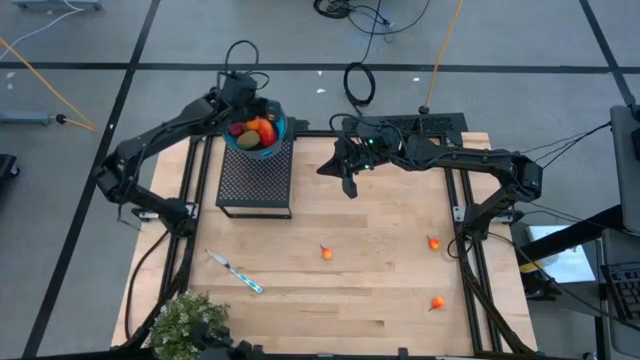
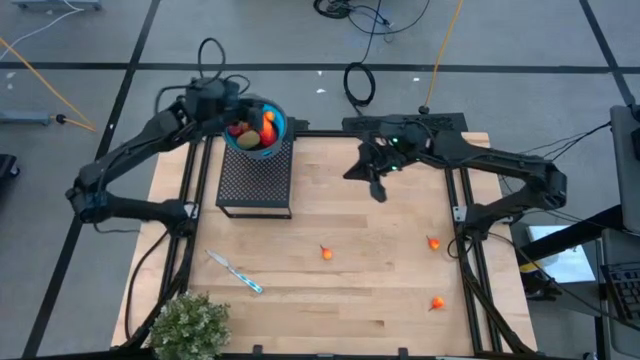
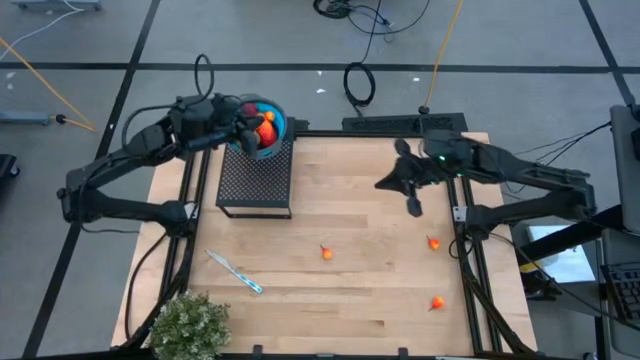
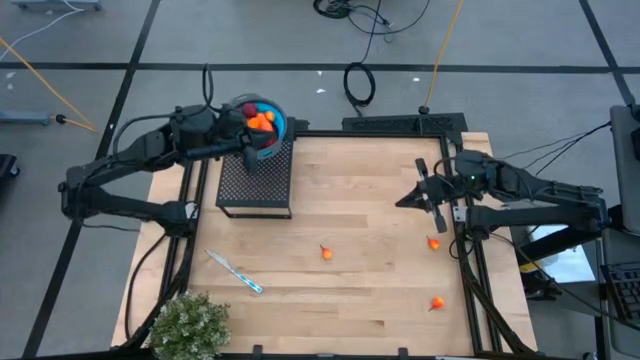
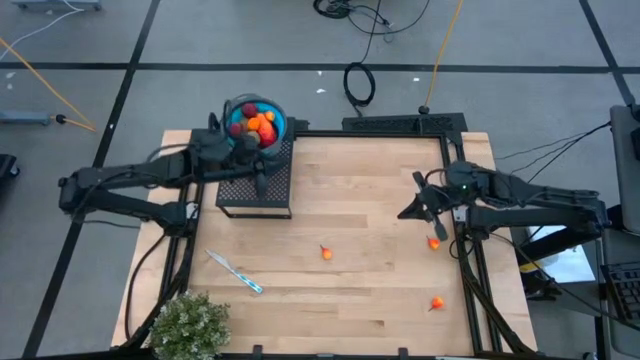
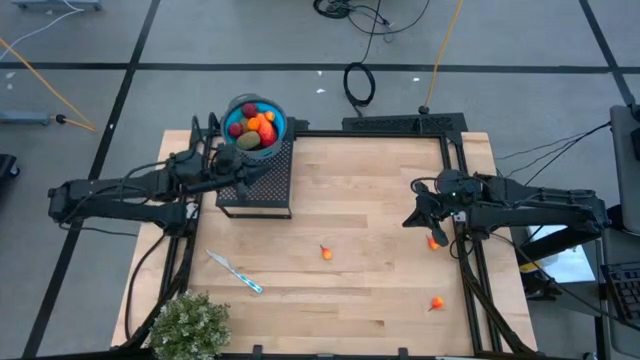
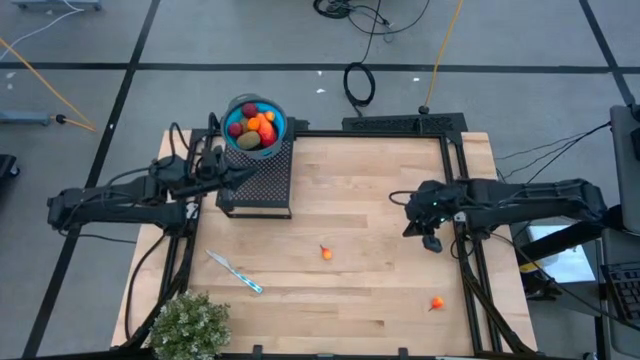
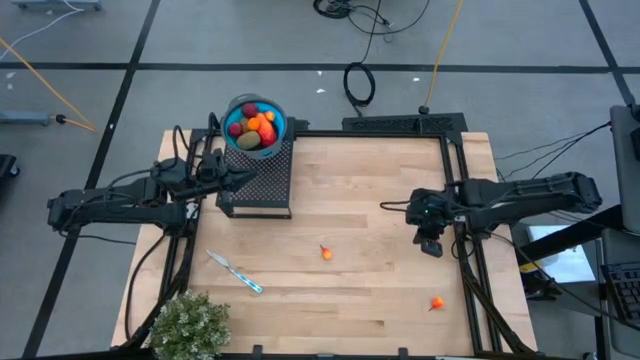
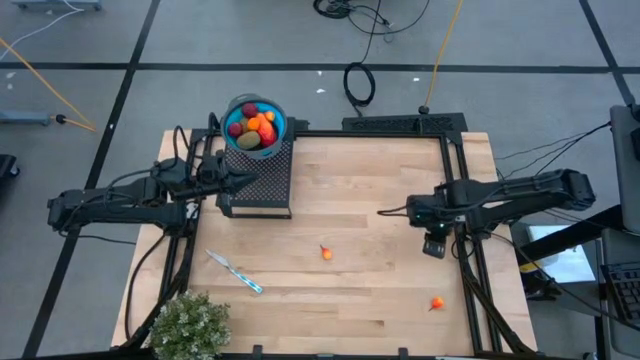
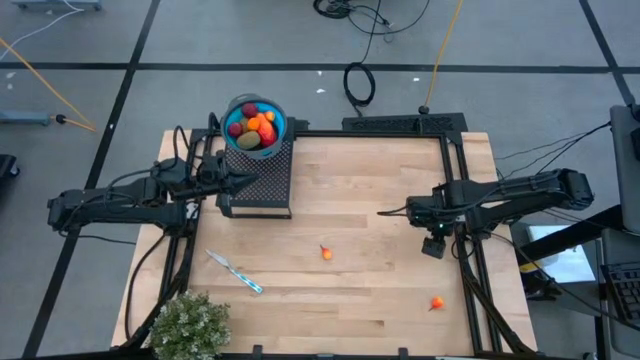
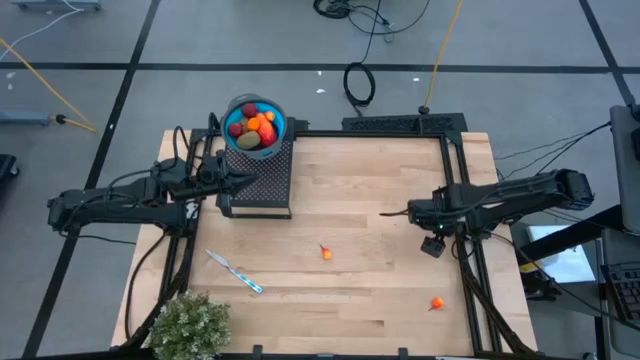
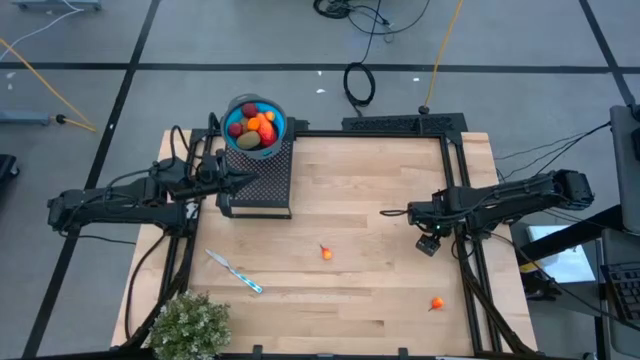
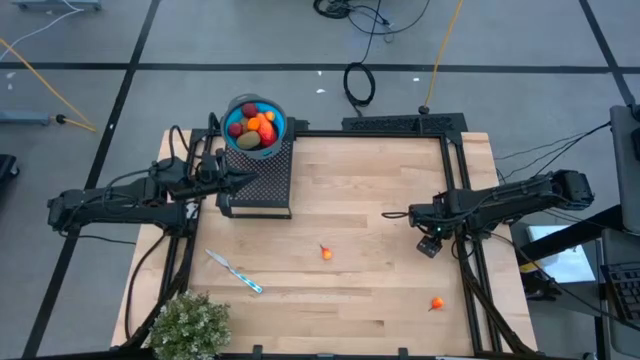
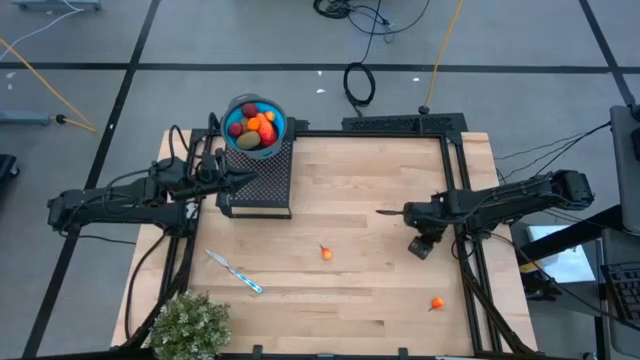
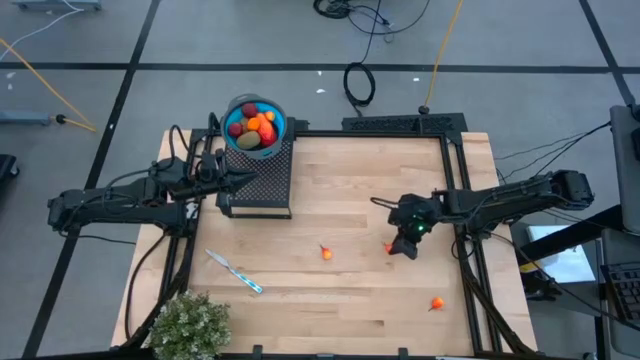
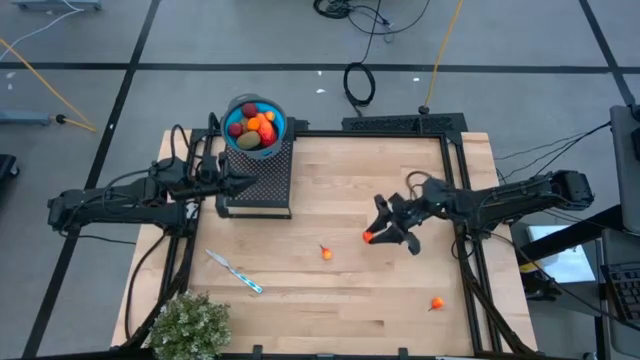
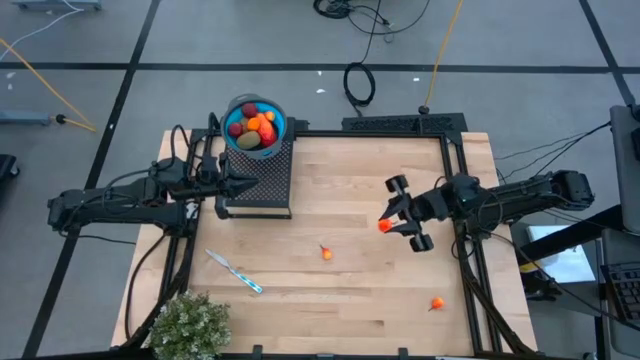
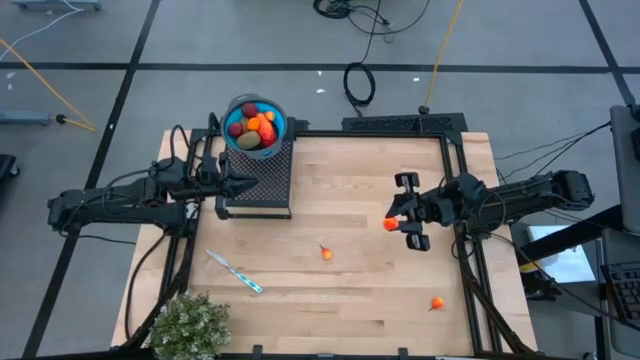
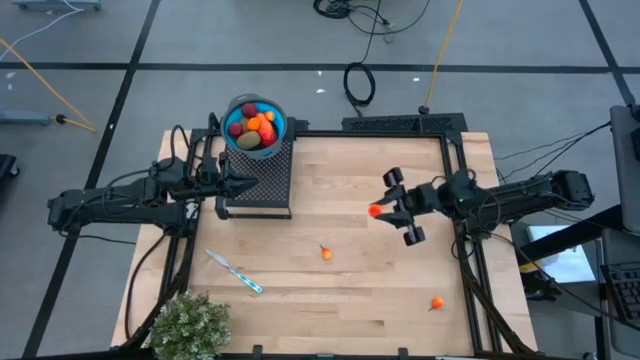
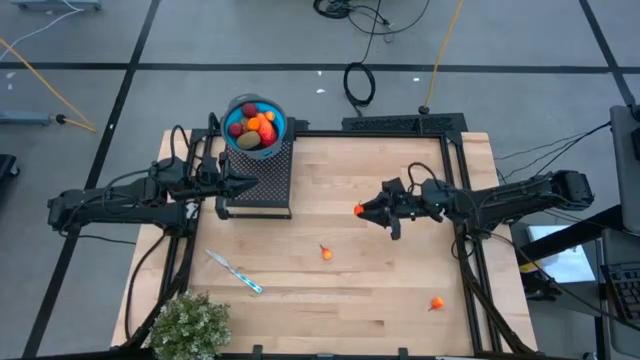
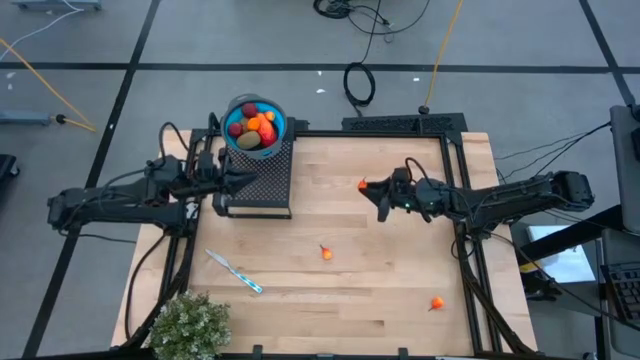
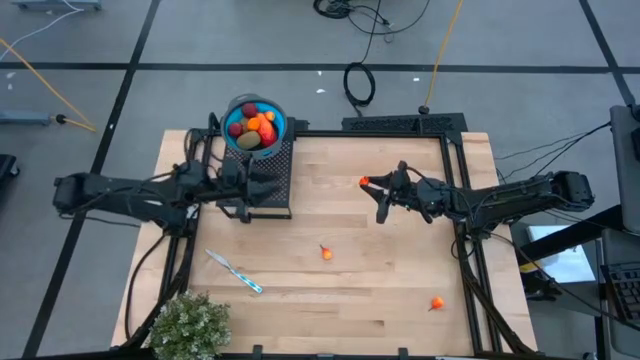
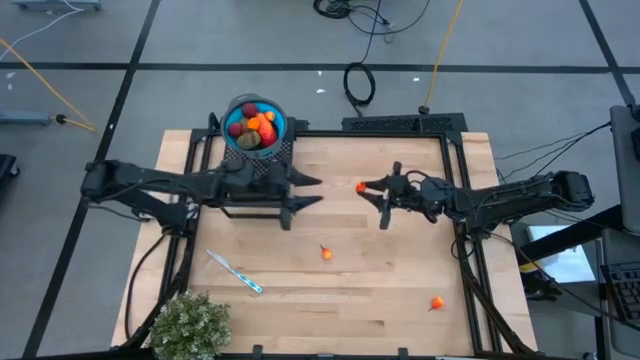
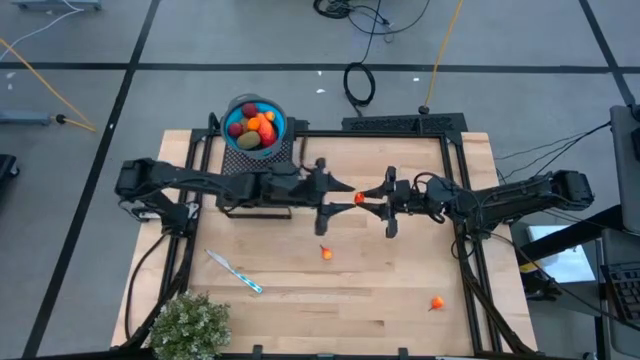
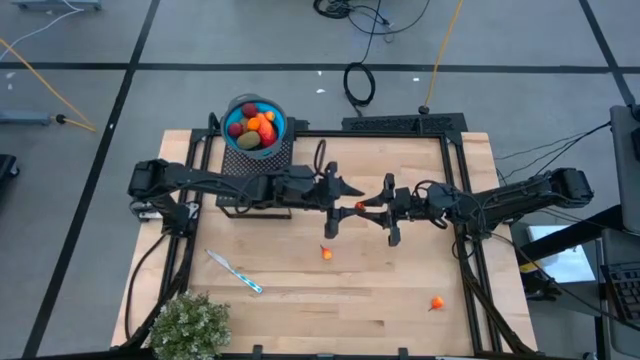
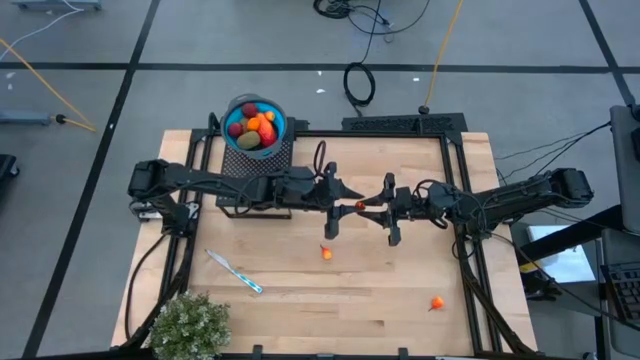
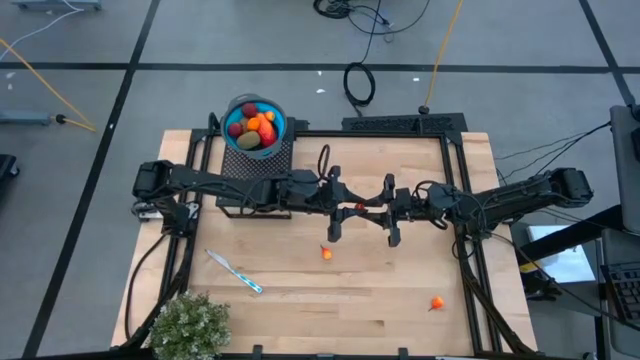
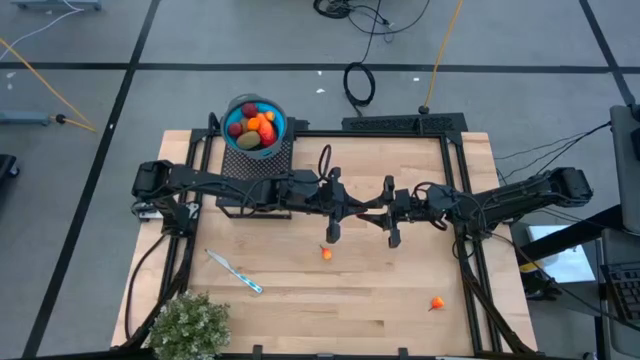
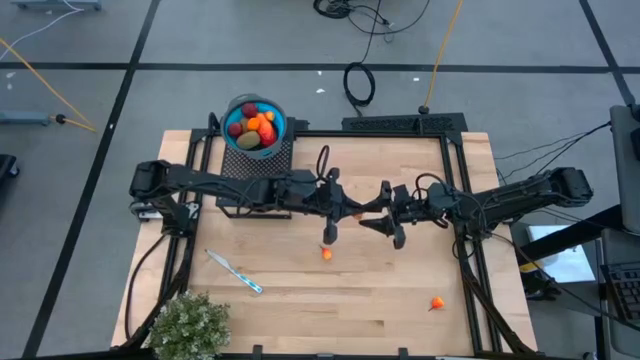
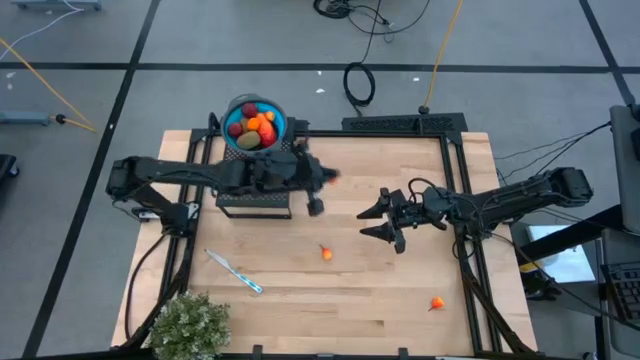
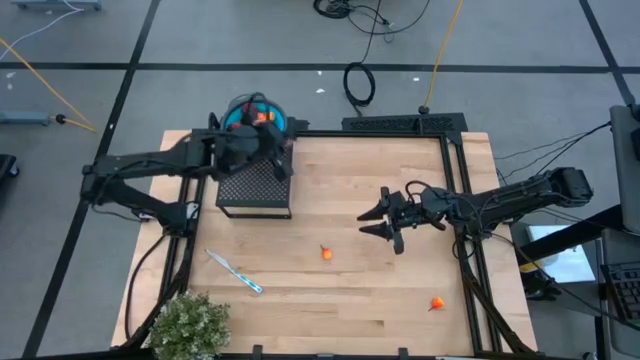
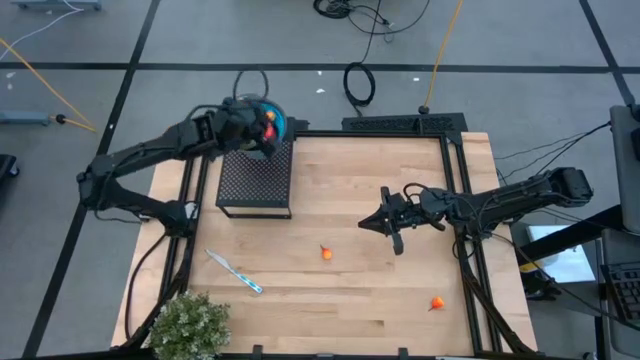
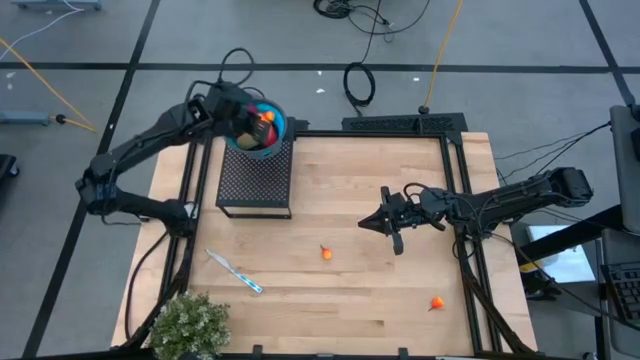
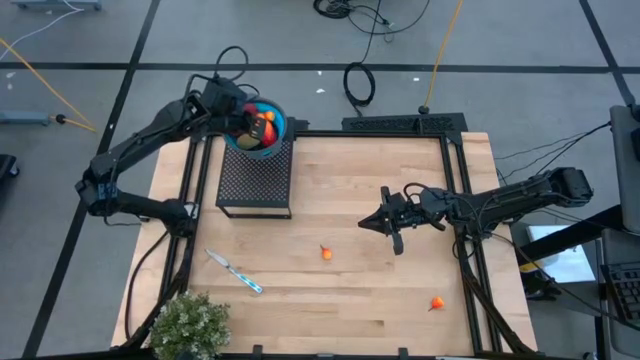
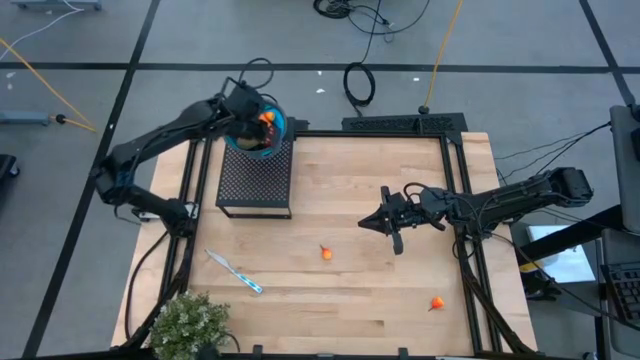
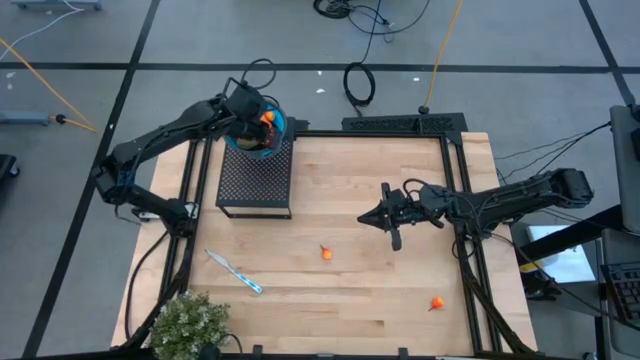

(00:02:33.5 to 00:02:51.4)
Task: Pick & Place Fruit
Put the pear into the blue strainer bowl on the shelf

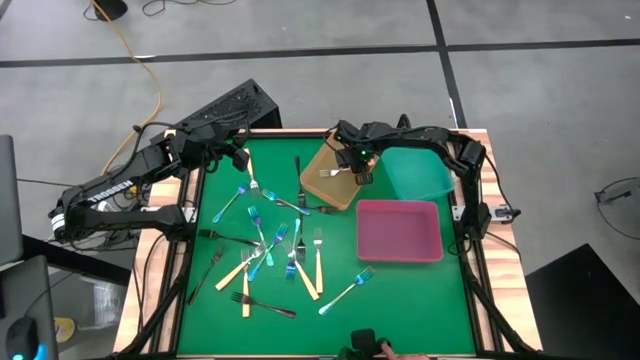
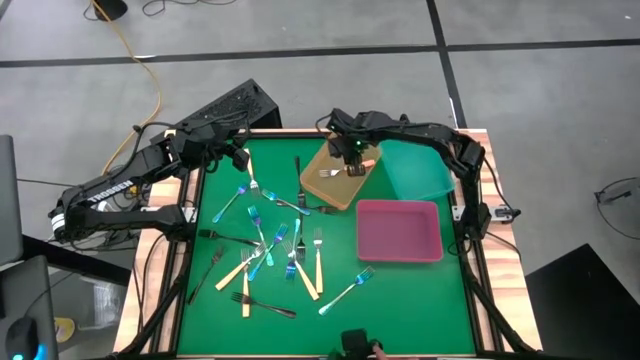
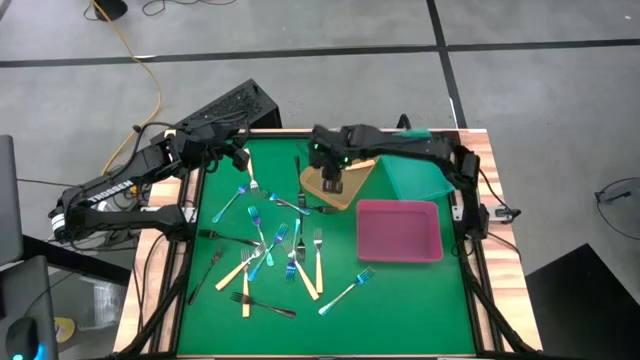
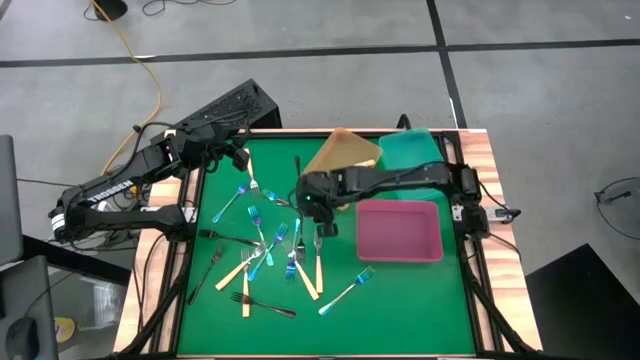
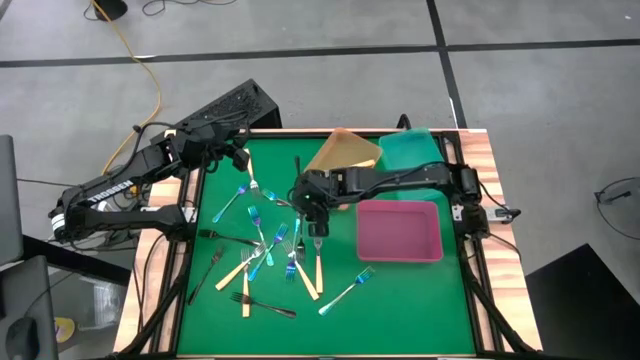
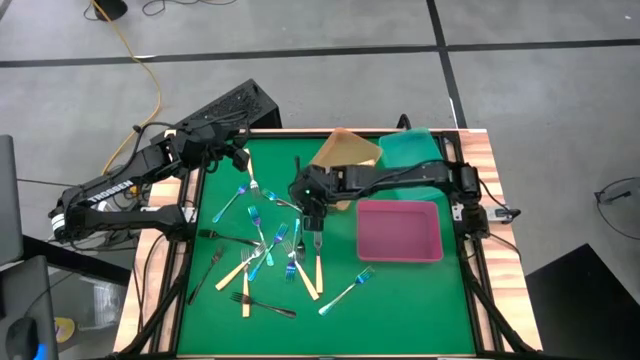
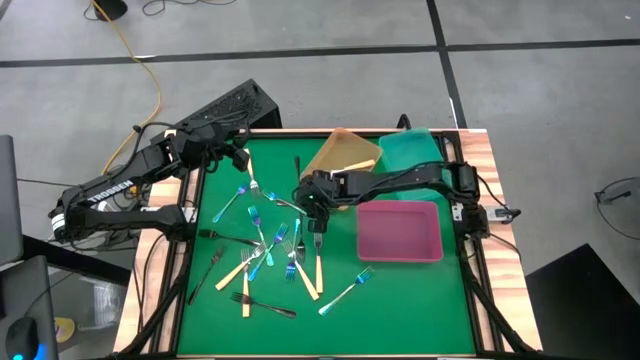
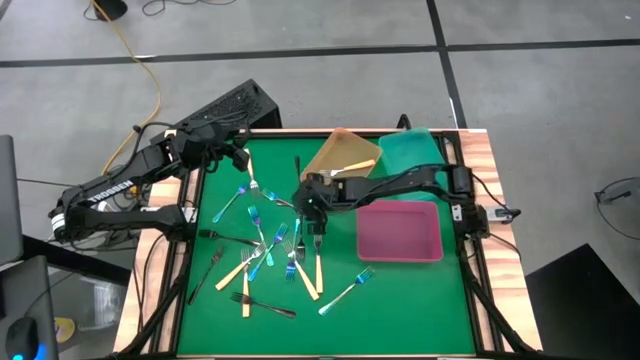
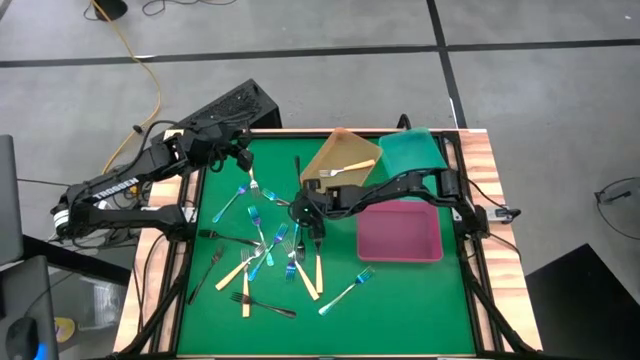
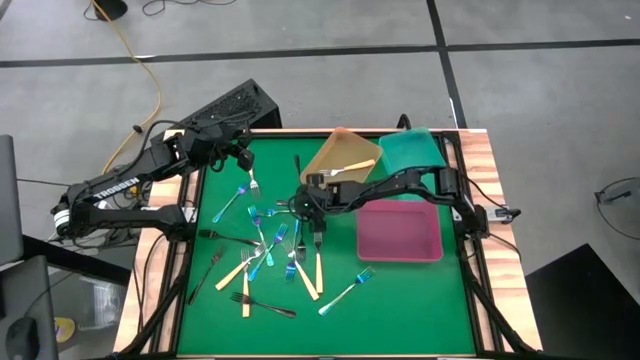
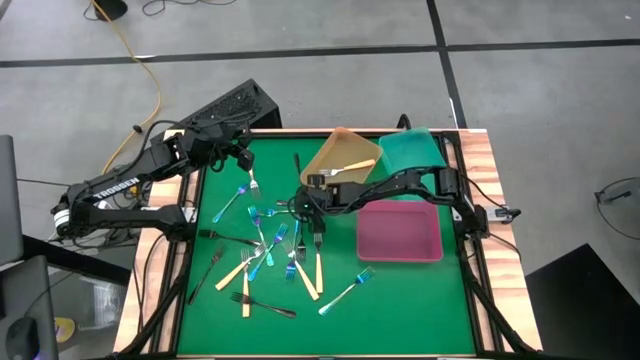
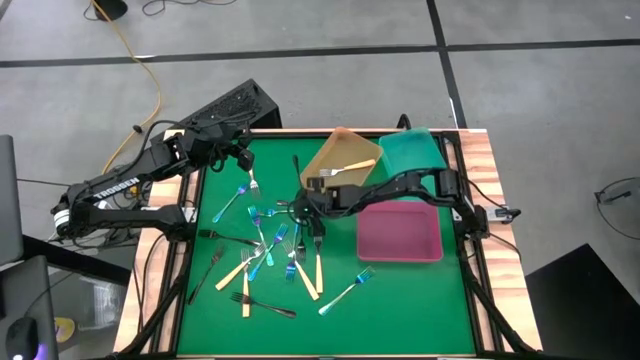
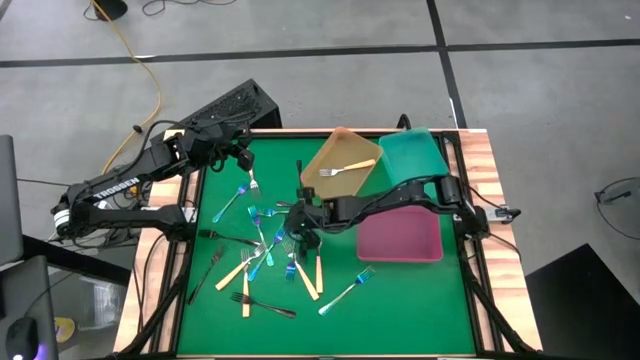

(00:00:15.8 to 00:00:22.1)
Task: Sort silverware by color (type)
Put the black fork into the blue bin
